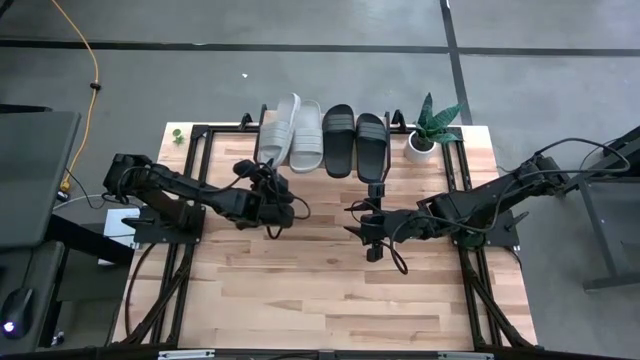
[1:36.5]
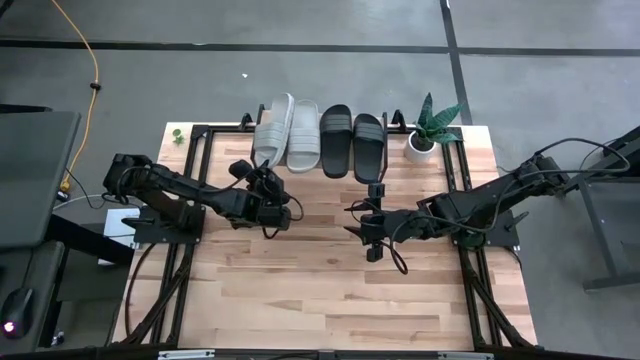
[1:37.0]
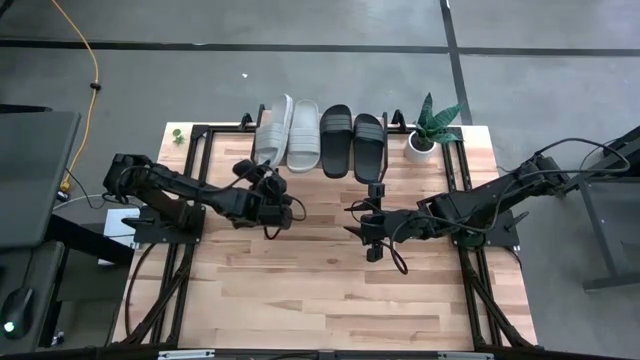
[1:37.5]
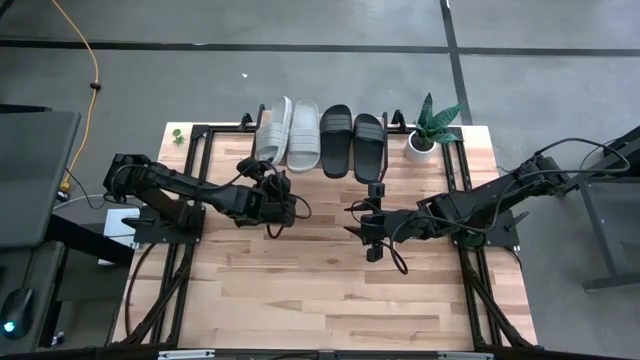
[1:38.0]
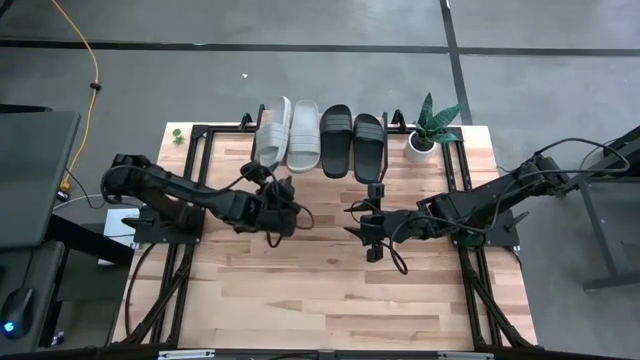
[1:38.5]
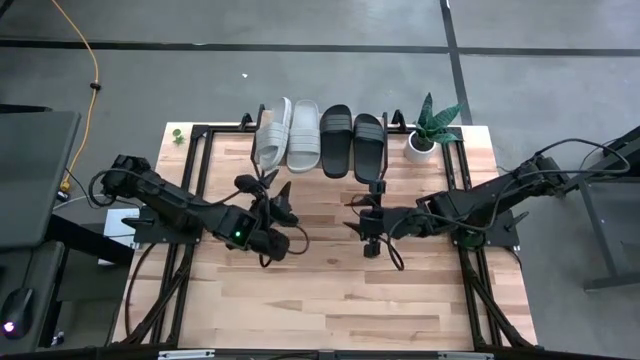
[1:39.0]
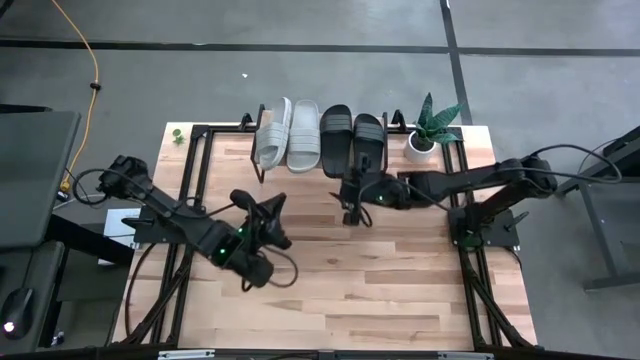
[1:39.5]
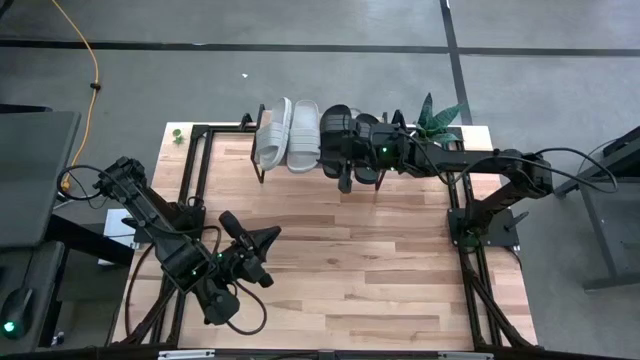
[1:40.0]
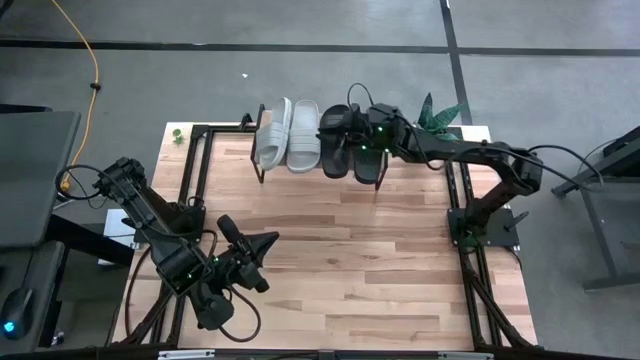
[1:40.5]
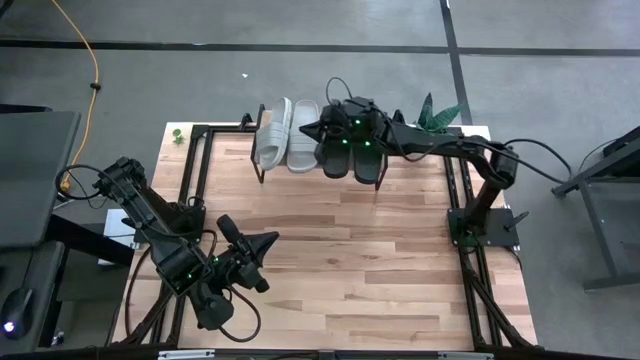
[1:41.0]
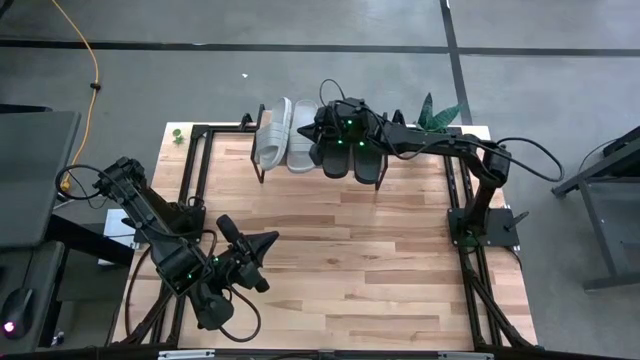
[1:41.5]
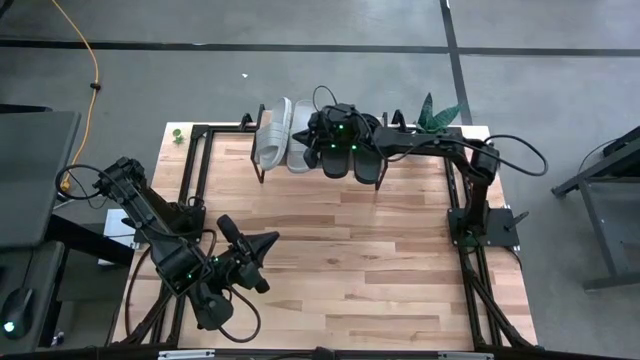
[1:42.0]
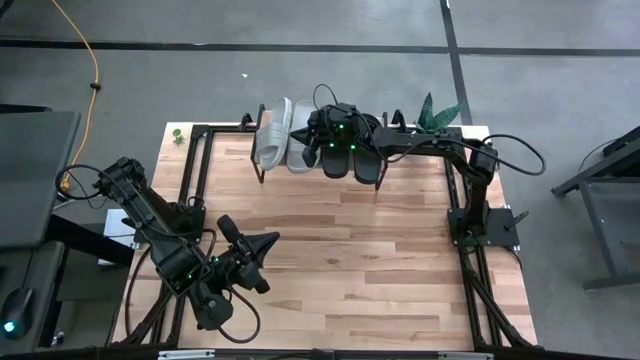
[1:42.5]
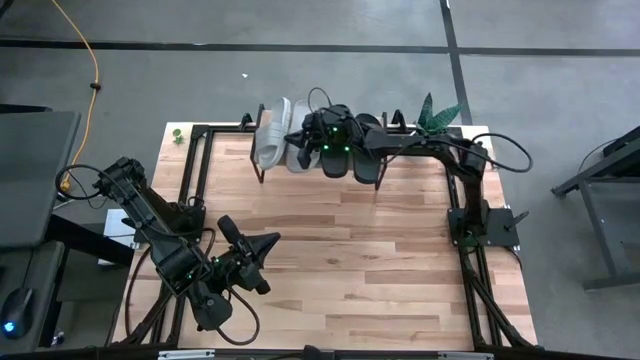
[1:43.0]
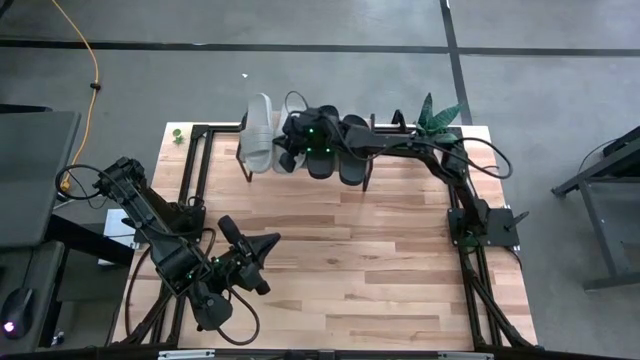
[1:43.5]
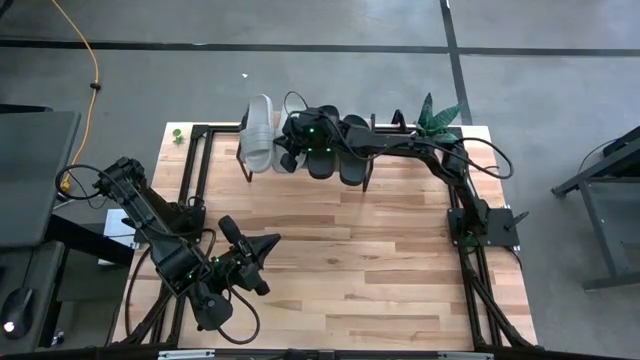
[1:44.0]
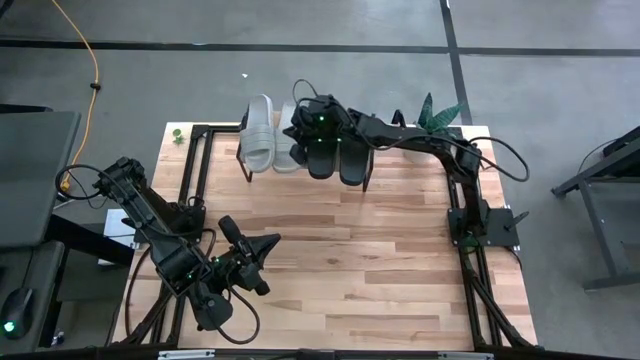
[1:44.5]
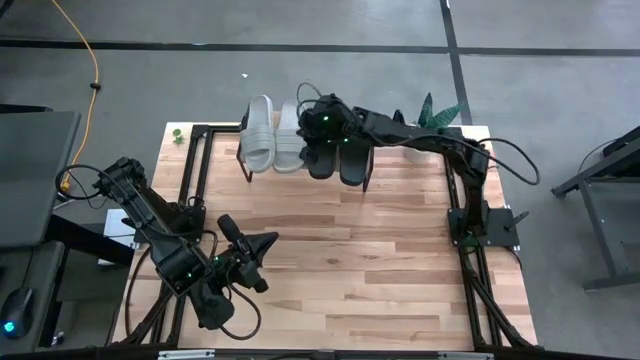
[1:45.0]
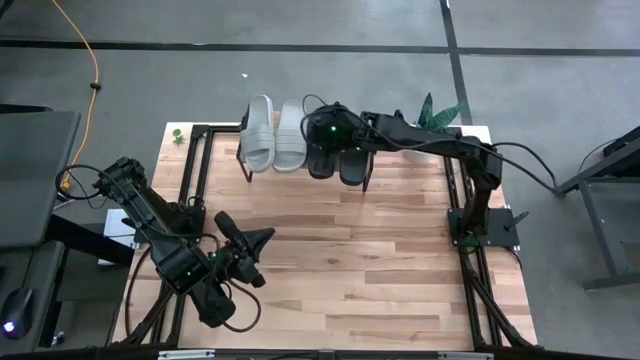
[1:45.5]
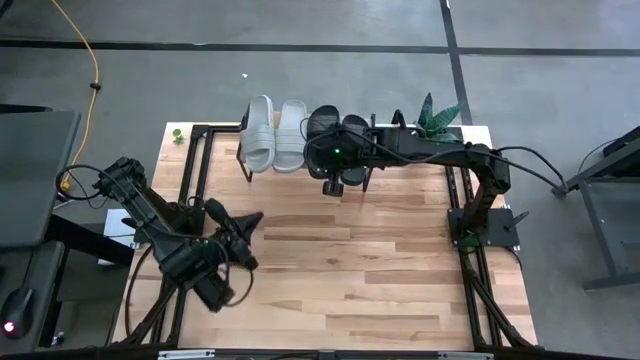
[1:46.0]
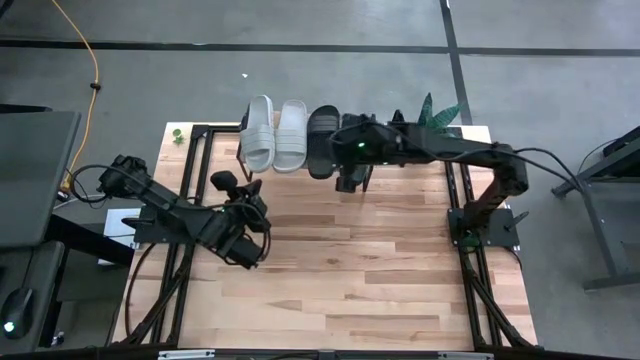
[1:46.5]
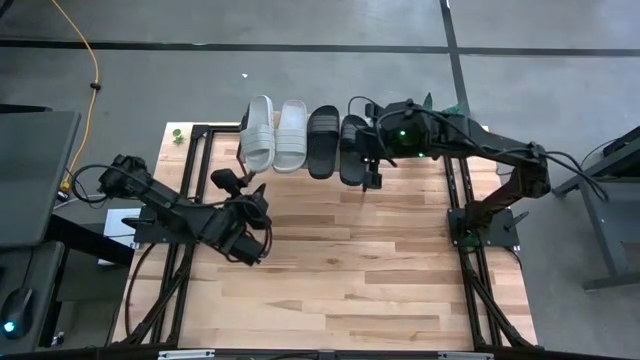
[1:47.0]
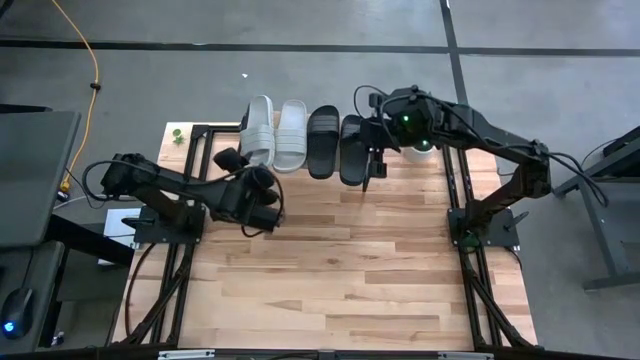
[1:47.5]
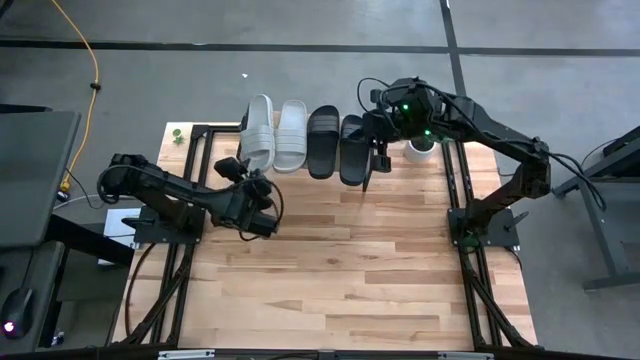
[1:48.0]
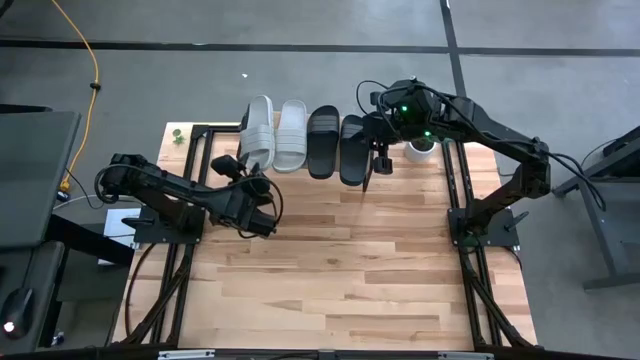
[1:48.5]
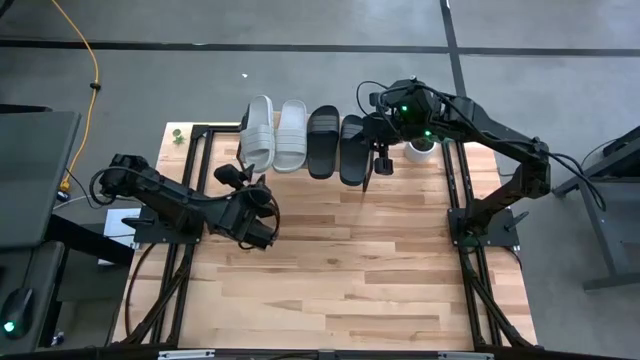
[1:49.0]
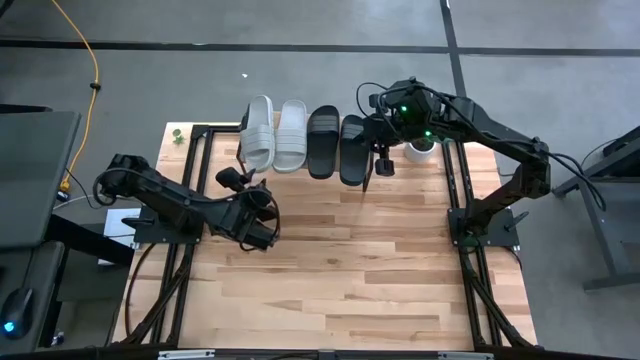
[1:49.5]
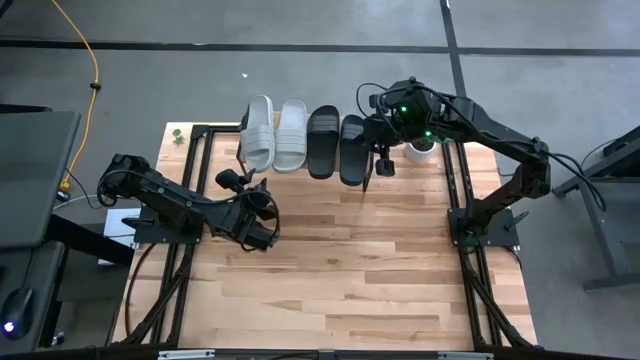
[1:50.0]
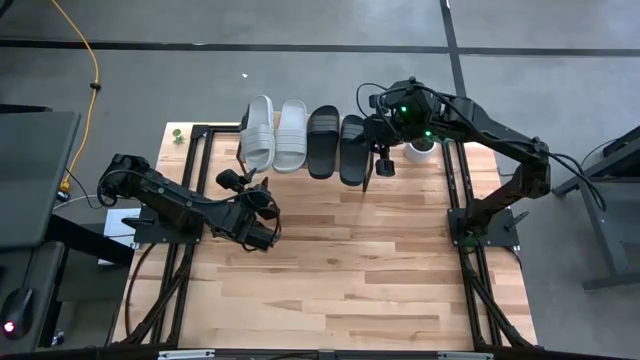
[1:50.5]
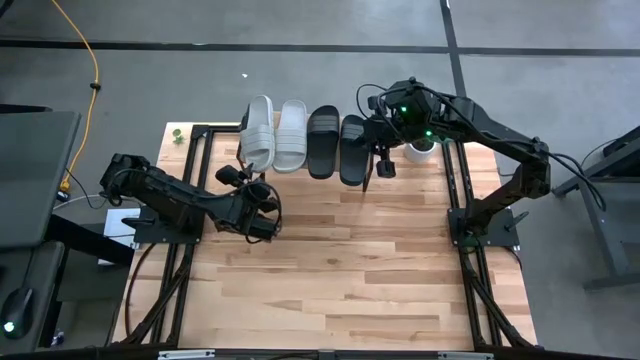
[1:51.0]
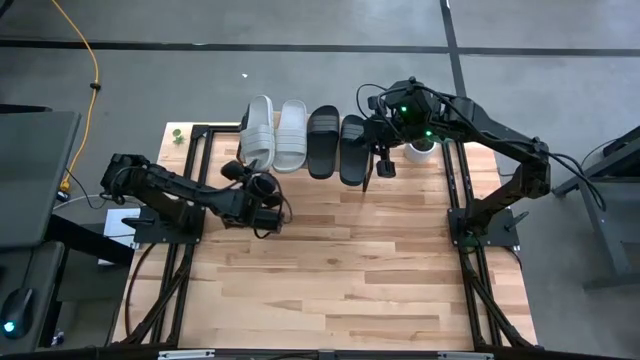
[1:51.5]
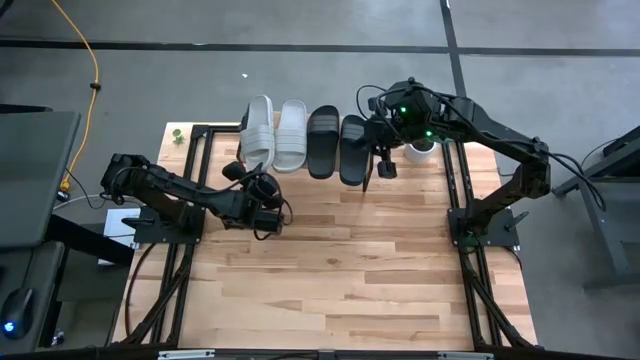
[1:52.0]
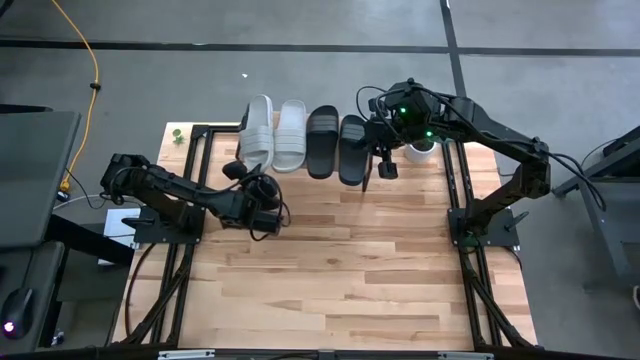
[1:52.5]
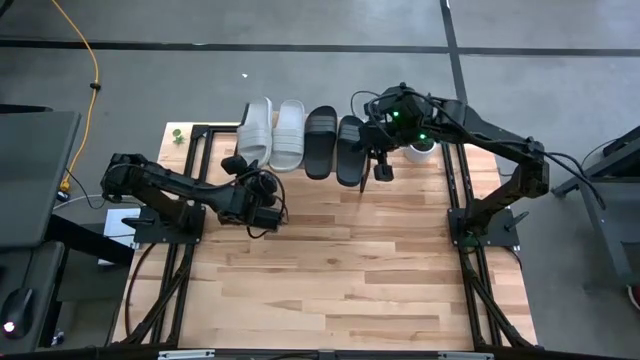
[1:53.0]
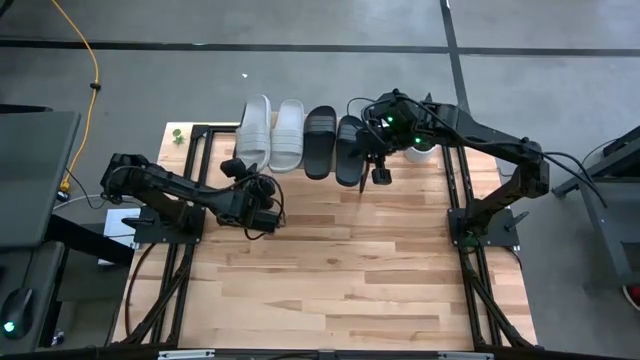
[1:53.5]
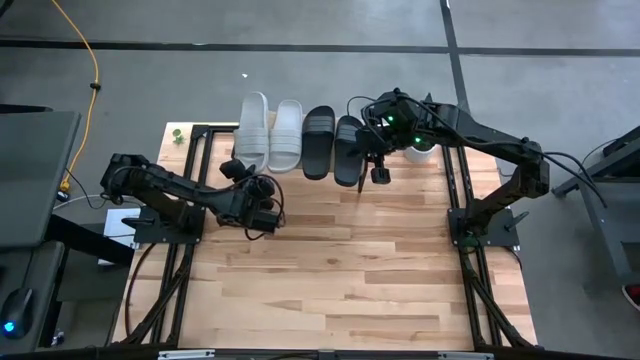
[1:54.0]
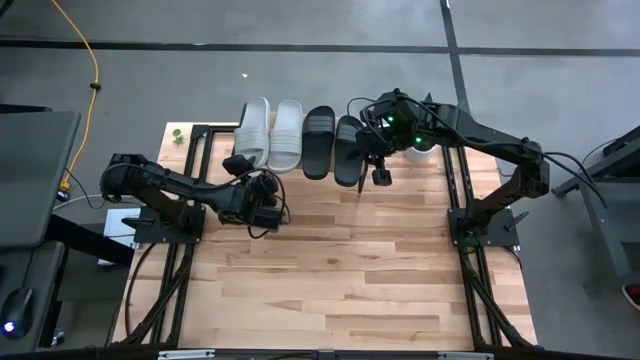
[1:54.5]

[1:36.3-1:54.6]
Task: Pick and place slides into the shelf
Put the white slide on the shelf

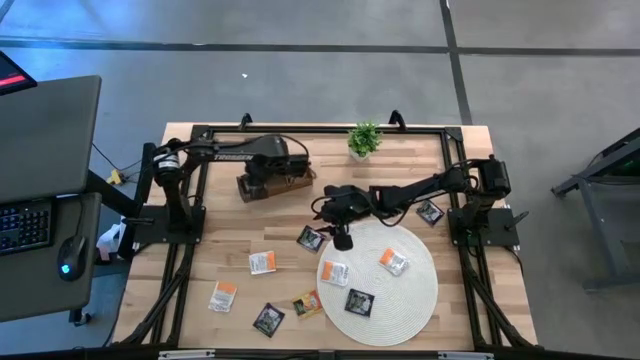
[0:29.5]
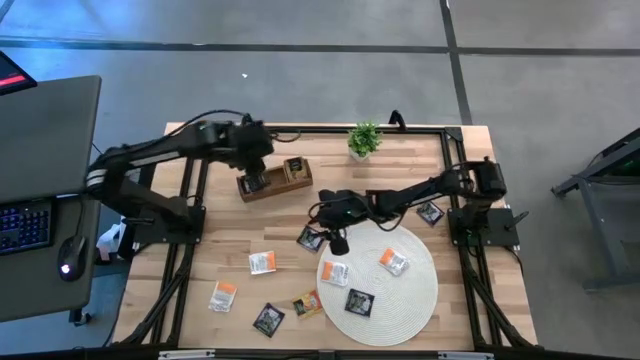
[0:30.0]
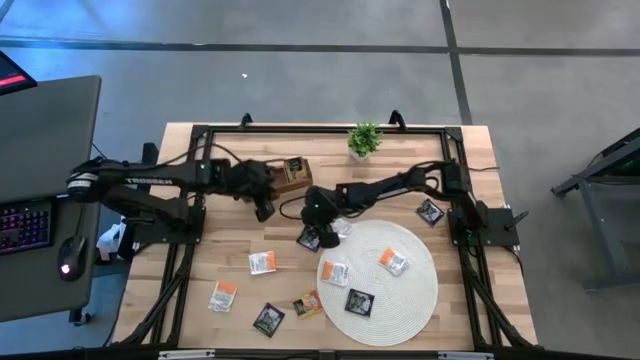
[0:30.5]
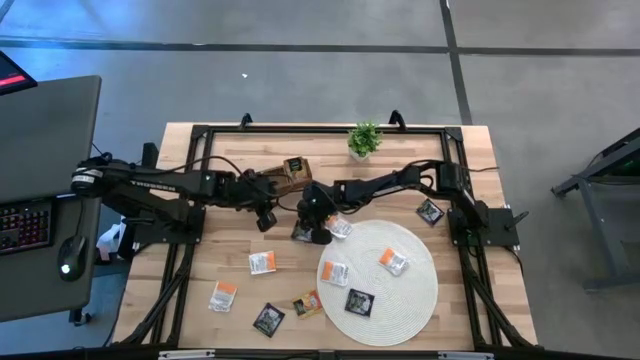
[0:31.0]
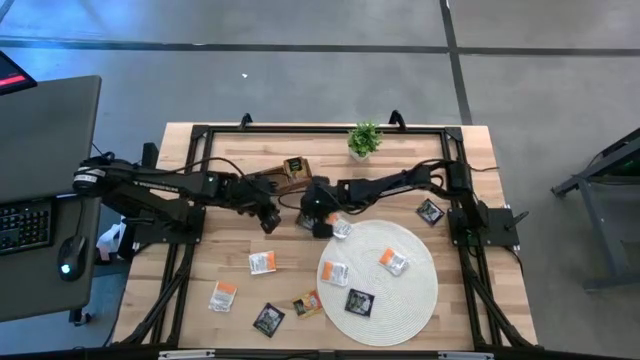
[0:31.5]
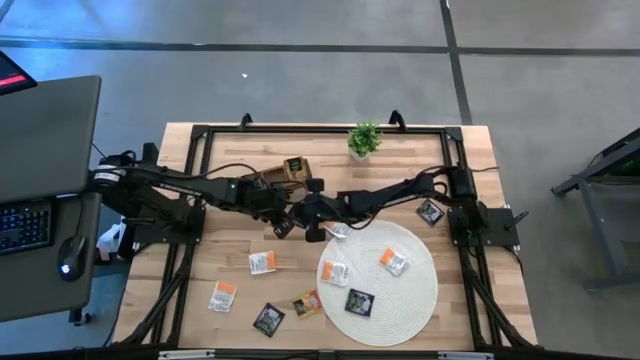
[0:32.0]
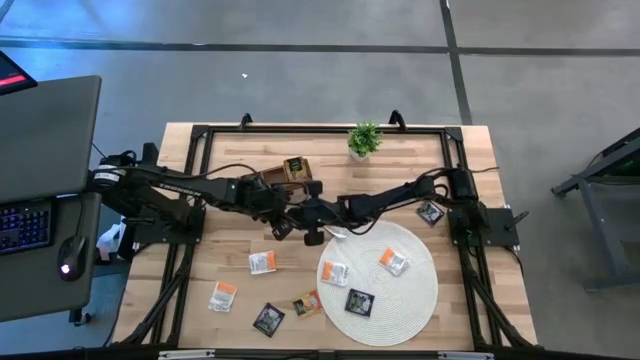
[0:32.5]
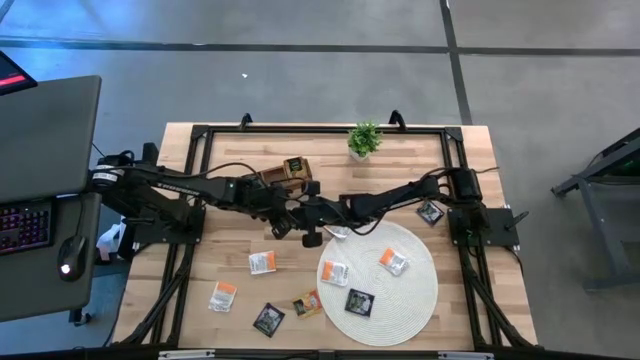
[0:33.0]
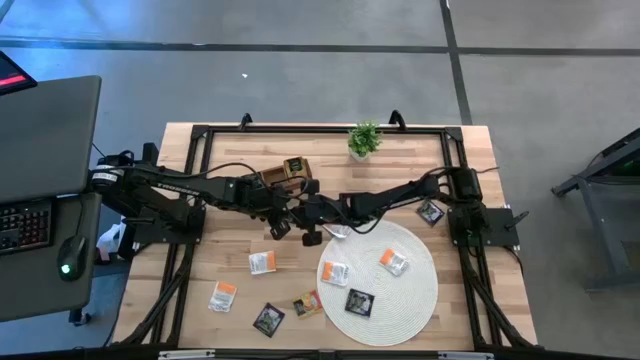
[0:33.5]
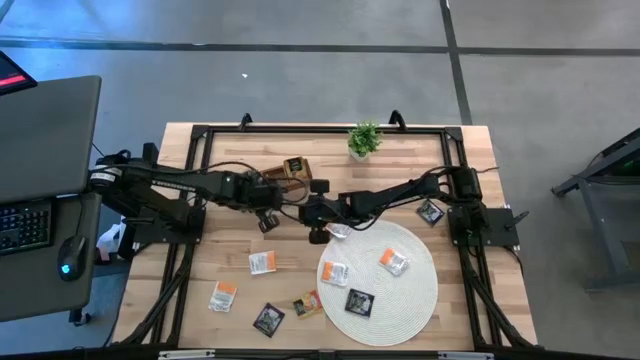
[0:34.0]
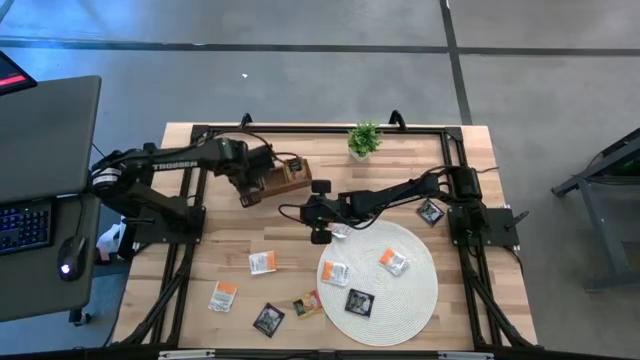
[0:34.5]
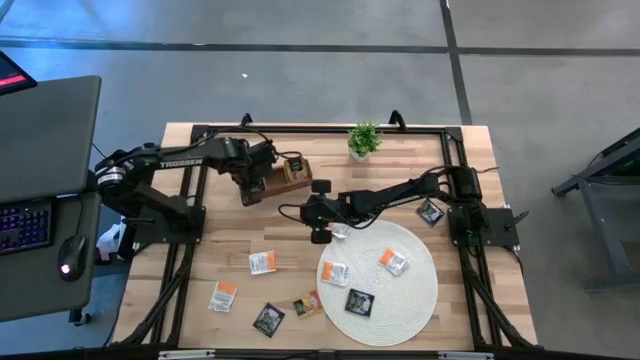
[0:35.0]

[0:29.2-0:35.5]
Task: Pick & Place Tea
Put the violet tea bag into the left section of the wooden organizer
